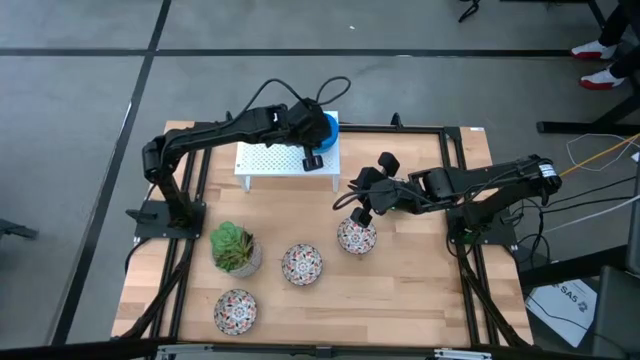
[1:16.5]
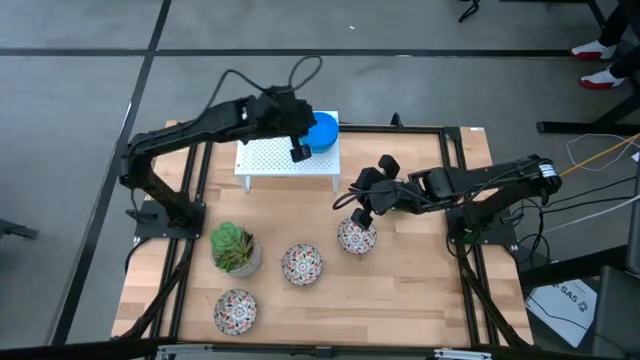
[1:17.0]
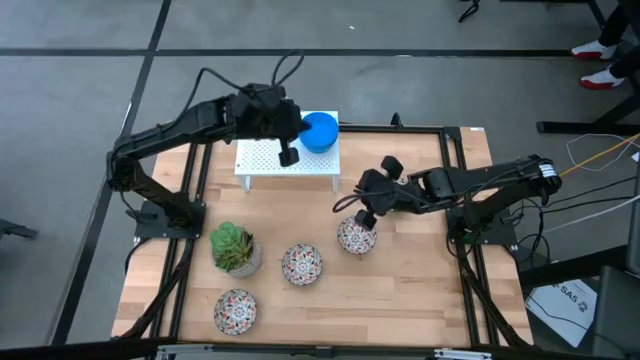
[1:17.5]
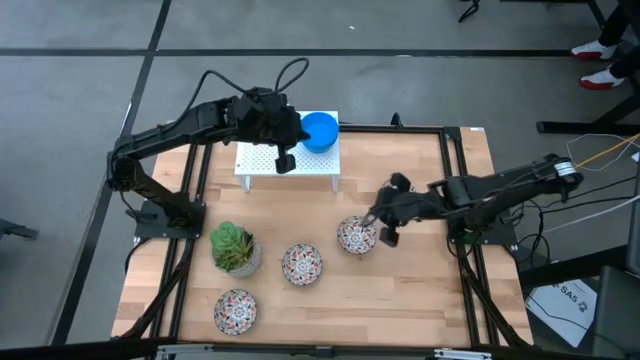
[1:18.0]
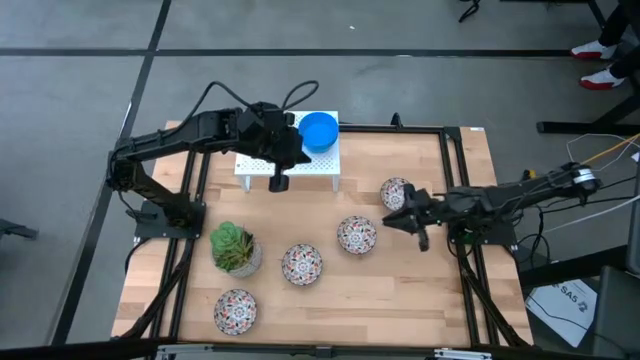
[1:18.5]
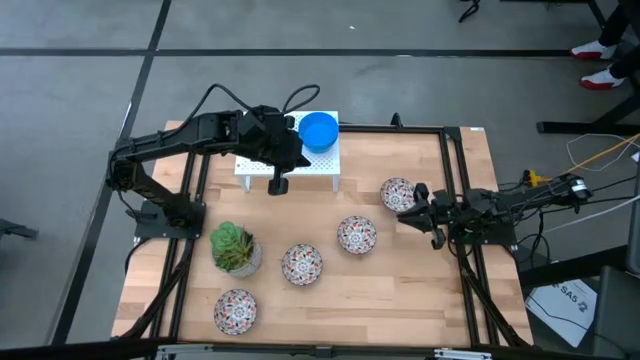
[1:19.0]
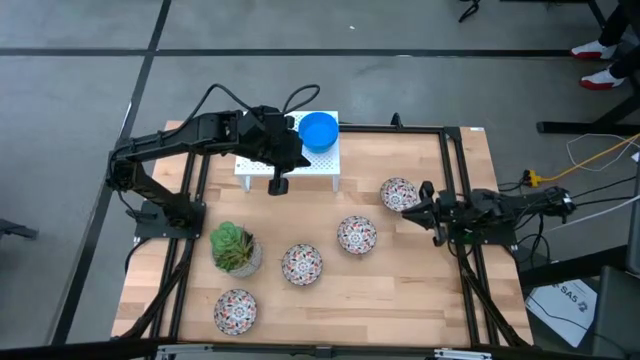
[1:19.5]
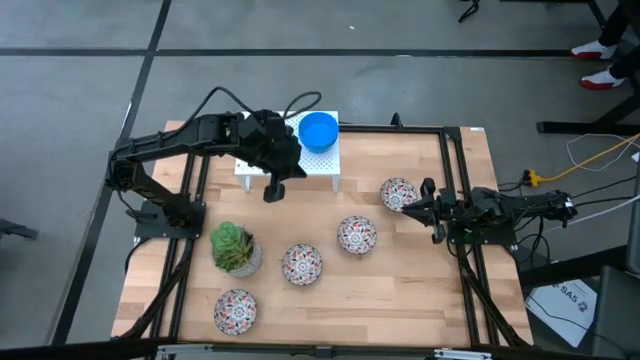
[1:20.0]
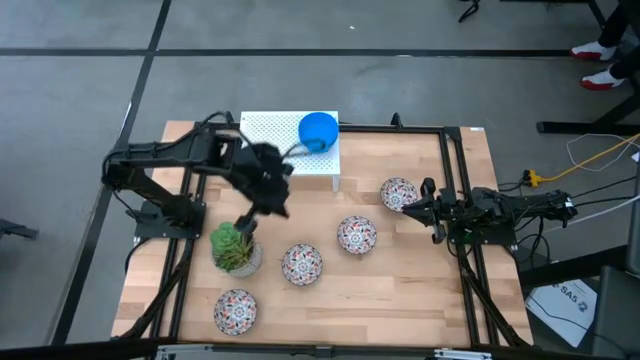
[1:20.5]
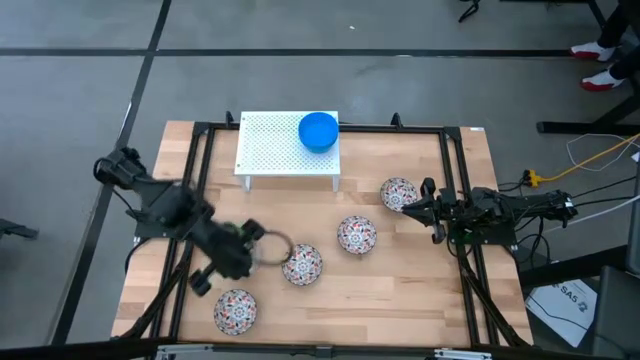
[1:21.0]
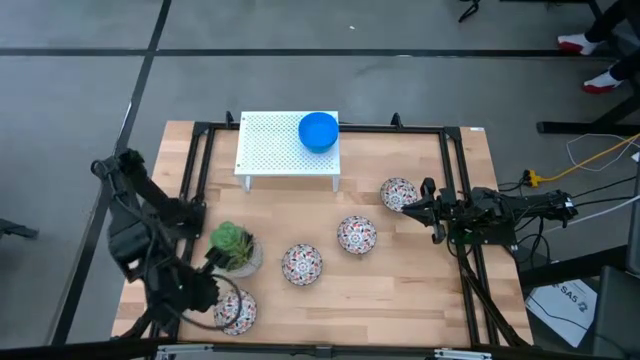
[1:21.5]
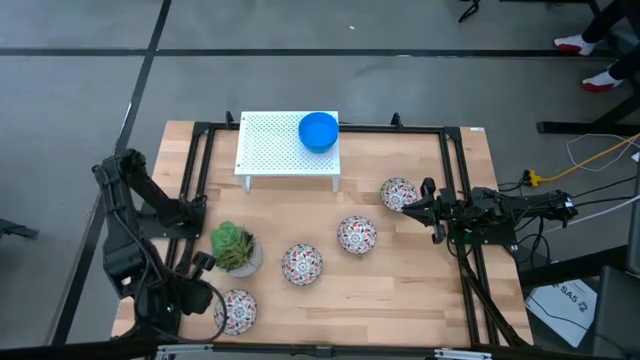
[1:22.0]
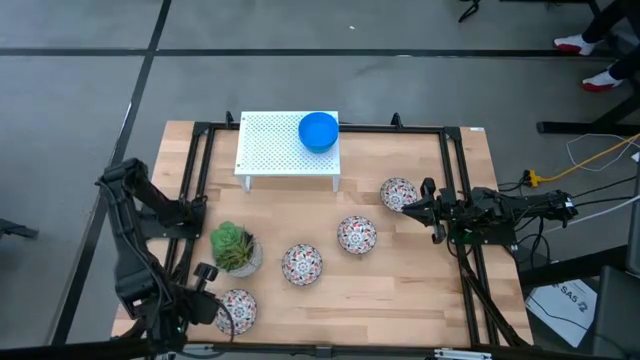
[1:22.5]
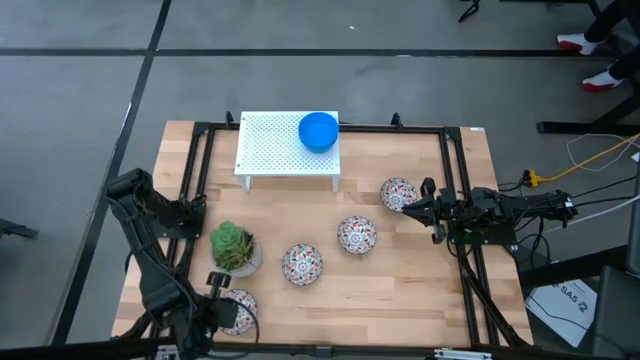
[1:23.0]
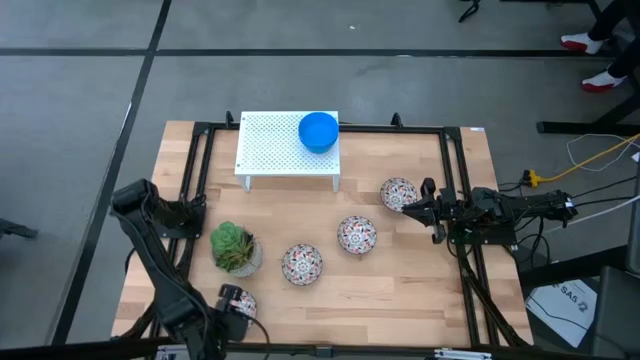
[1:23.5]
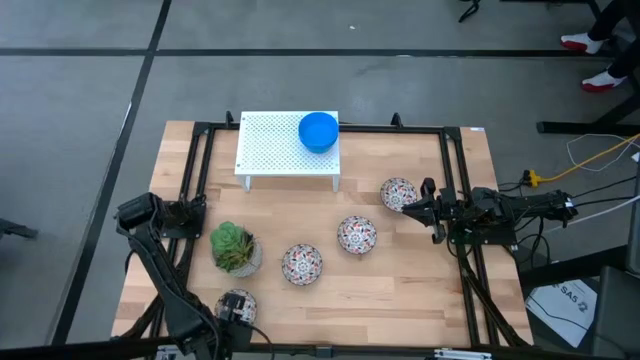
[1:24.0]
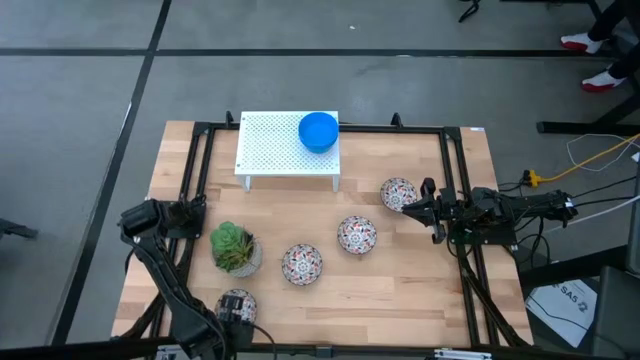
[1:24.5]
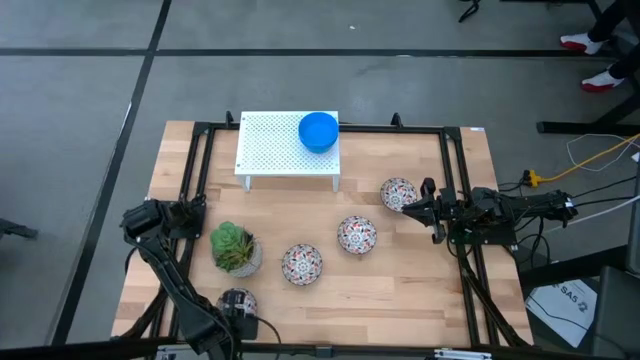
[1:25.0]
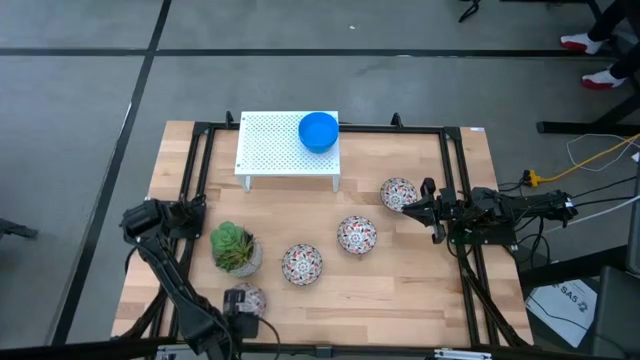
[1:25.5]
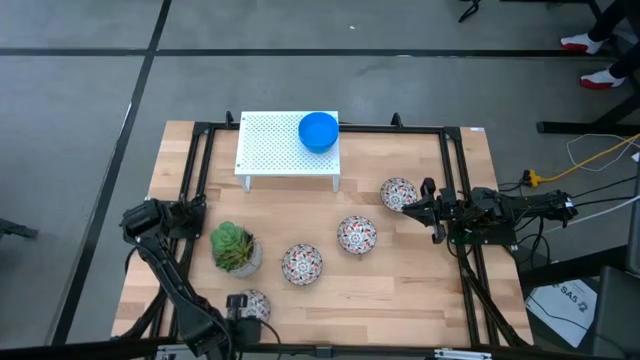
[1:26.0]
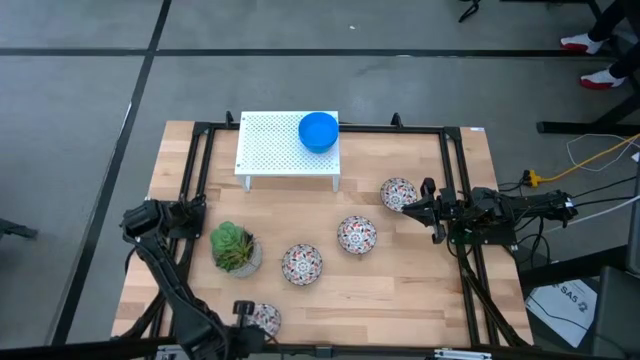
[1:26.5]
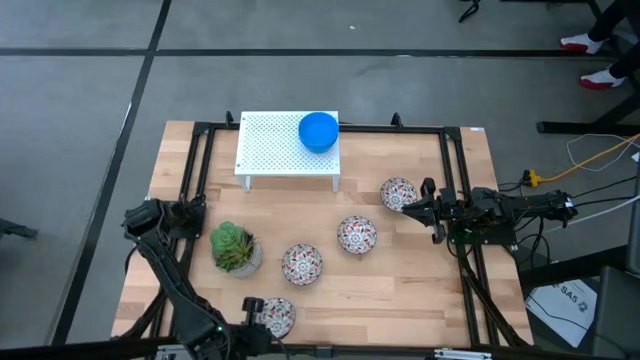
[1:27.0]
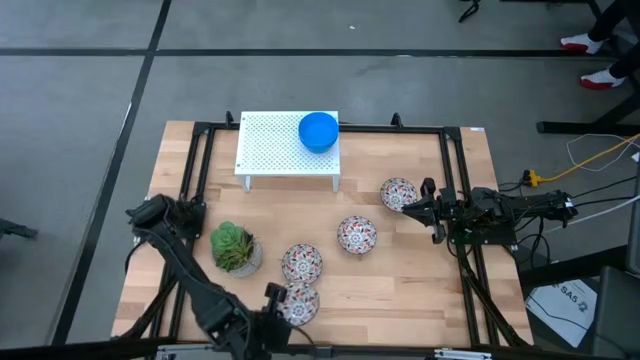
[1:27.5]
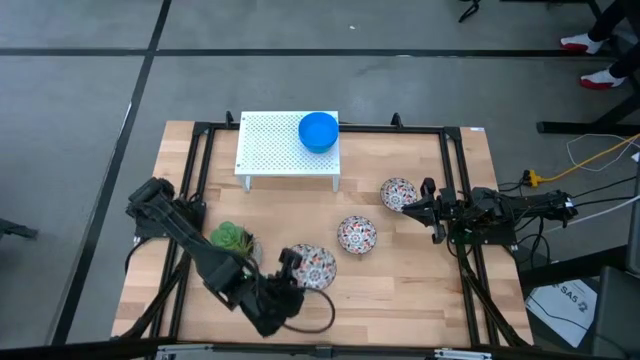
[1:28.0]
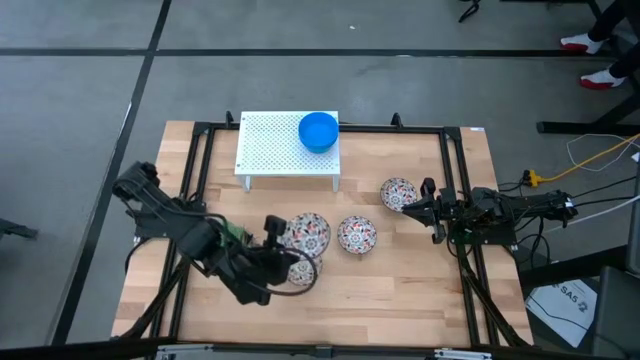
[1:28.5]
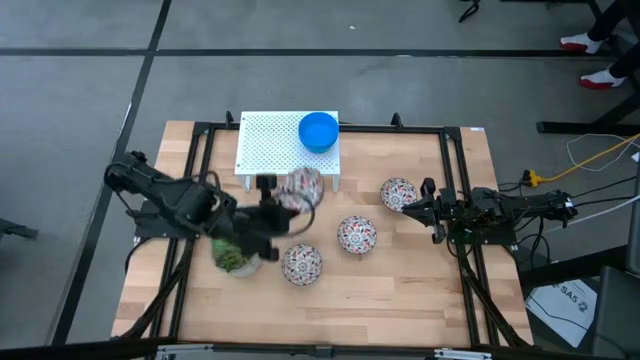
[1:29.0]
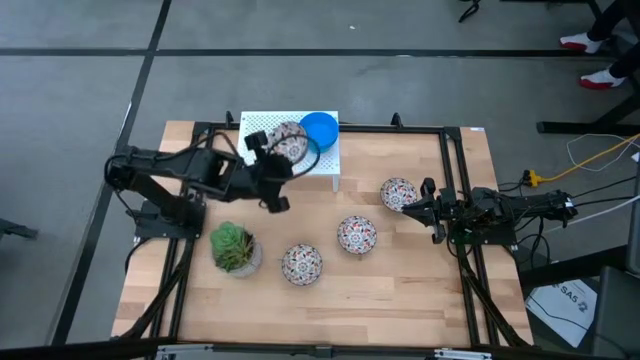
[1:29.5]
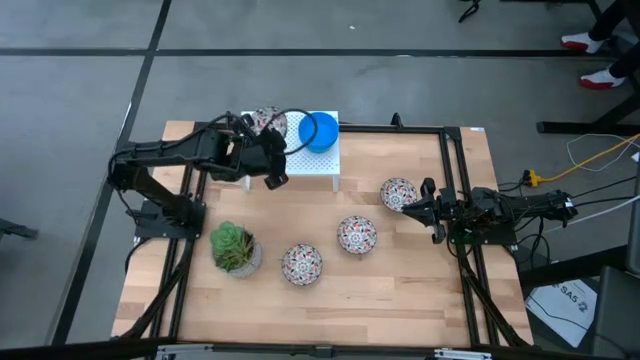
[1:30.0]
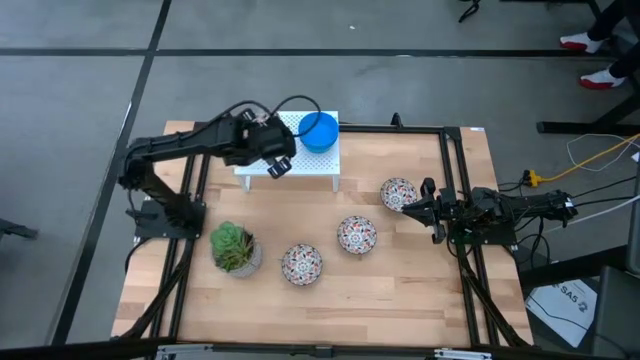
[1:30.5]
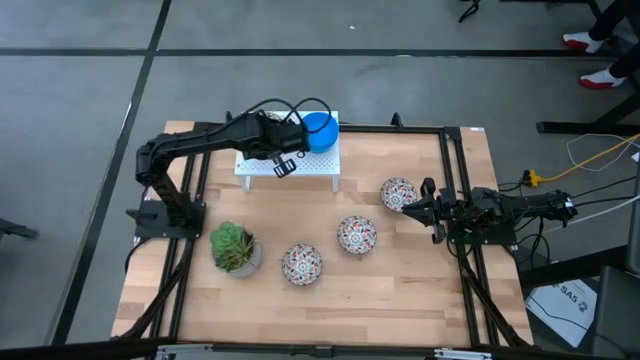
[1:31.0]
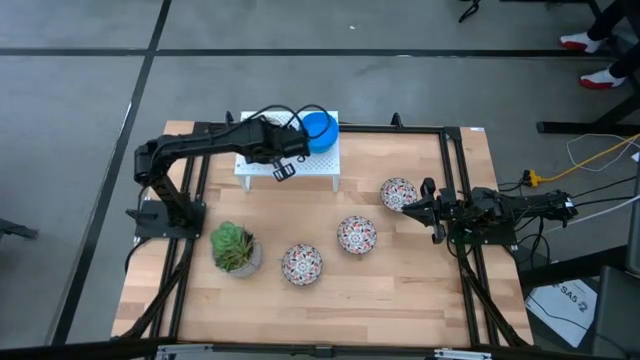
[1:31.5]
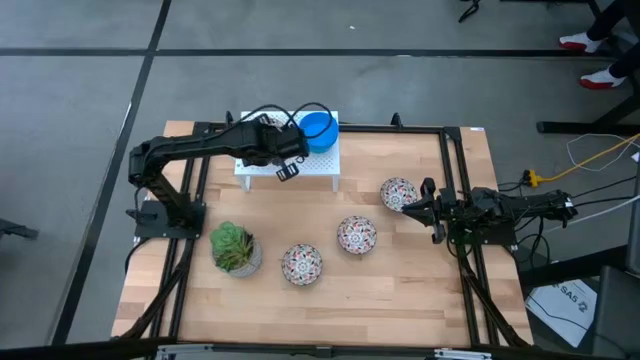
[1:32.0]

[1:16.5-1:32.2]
Task: Pick & Place Mini bowls
Put the white patterned bowl on the shelf
